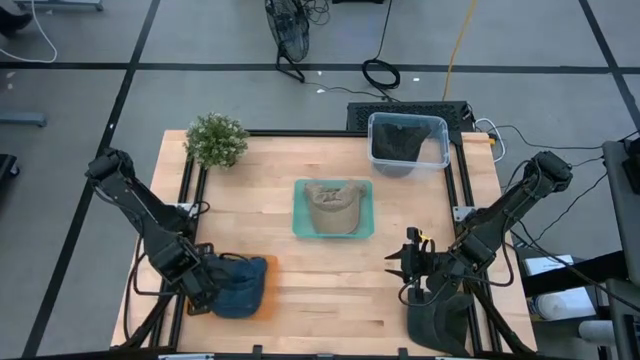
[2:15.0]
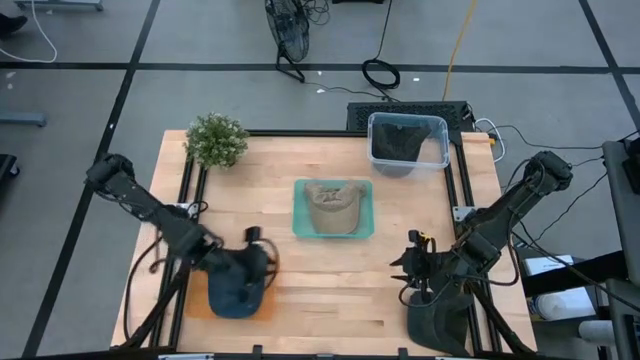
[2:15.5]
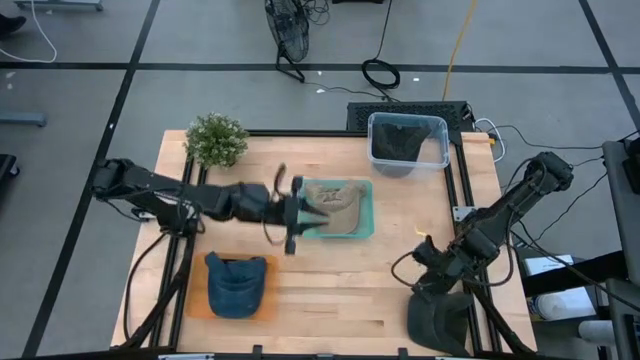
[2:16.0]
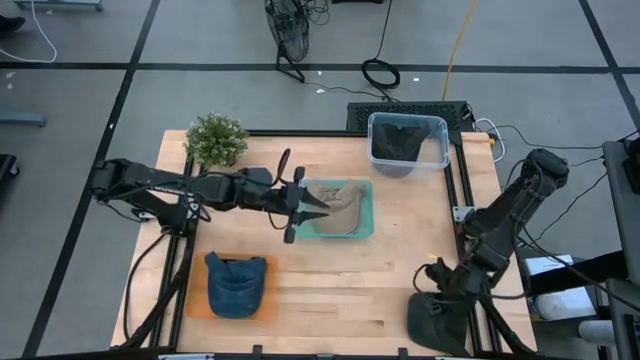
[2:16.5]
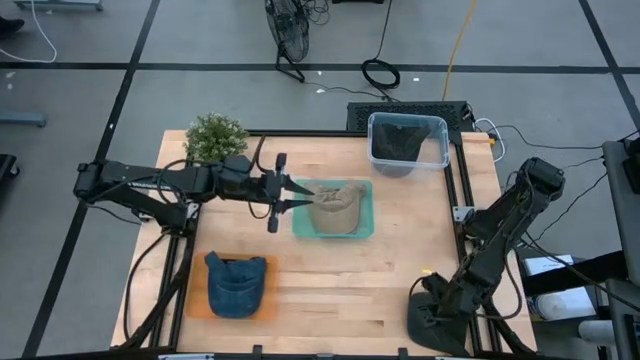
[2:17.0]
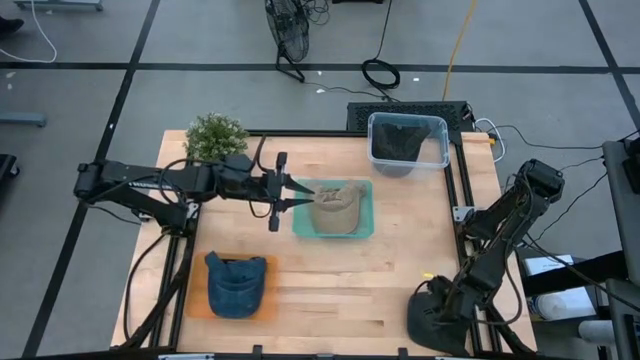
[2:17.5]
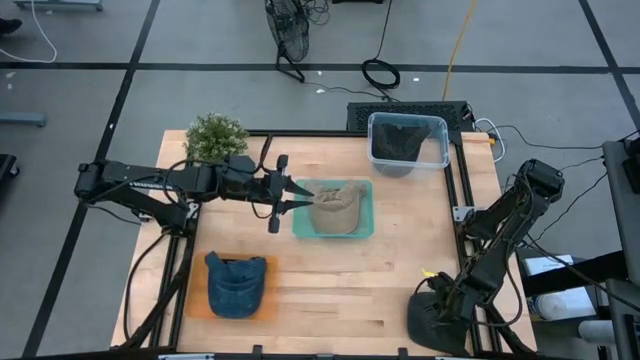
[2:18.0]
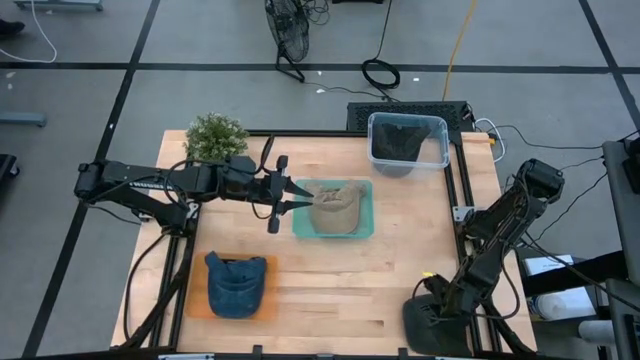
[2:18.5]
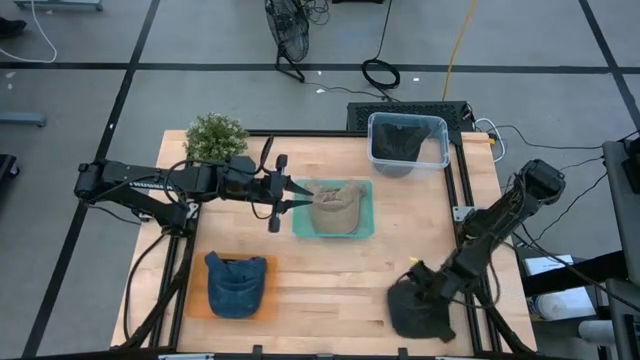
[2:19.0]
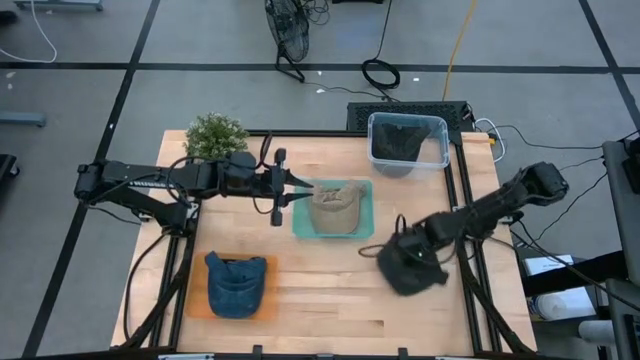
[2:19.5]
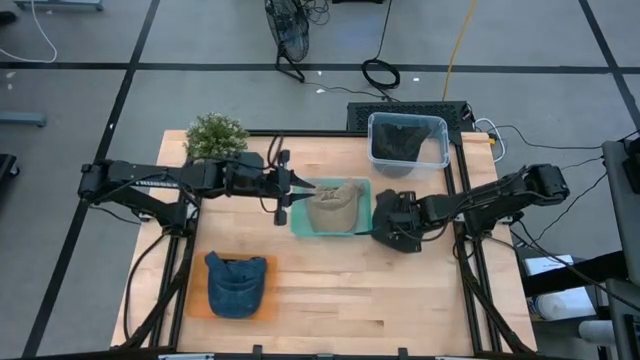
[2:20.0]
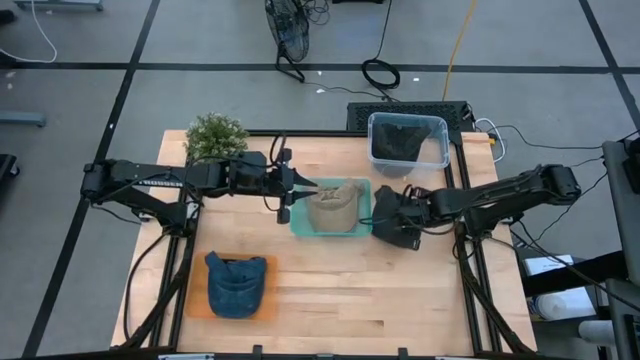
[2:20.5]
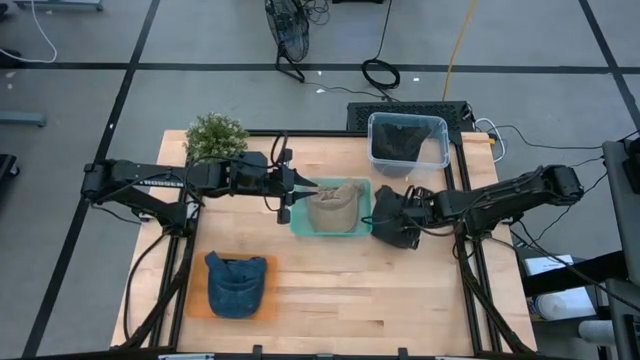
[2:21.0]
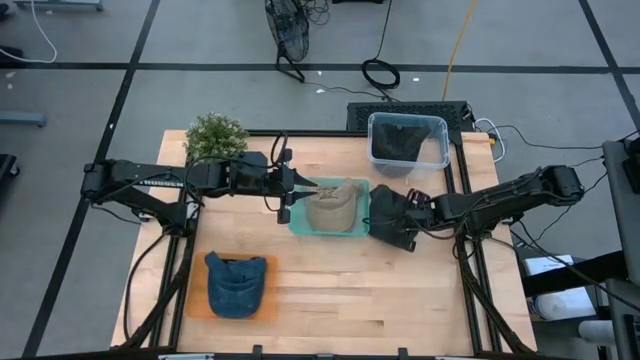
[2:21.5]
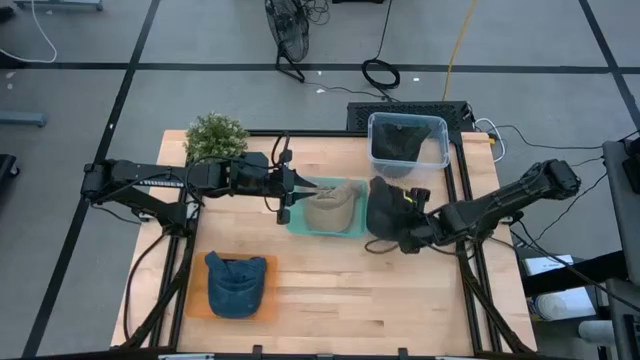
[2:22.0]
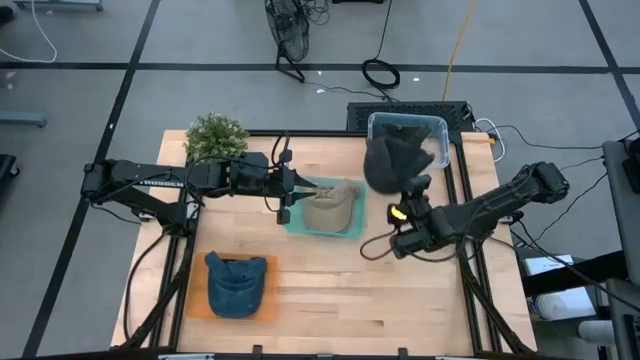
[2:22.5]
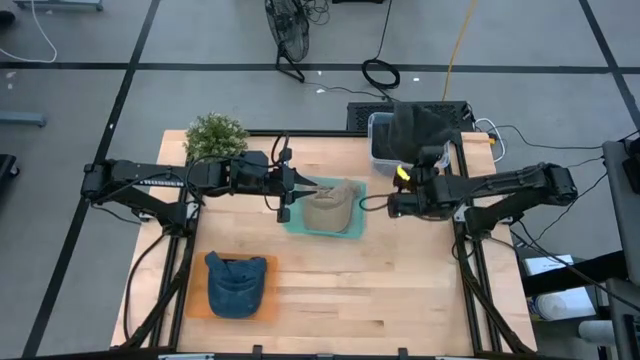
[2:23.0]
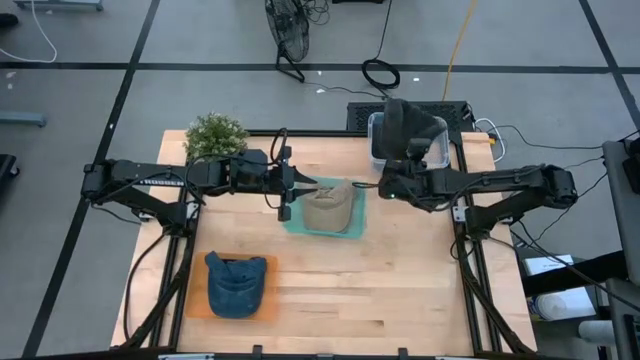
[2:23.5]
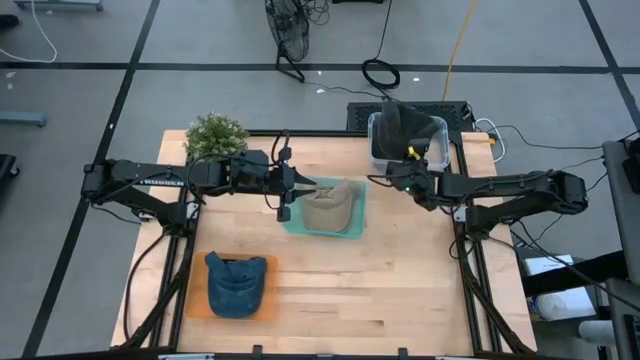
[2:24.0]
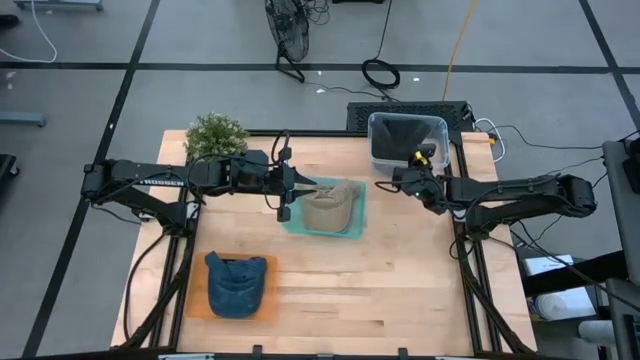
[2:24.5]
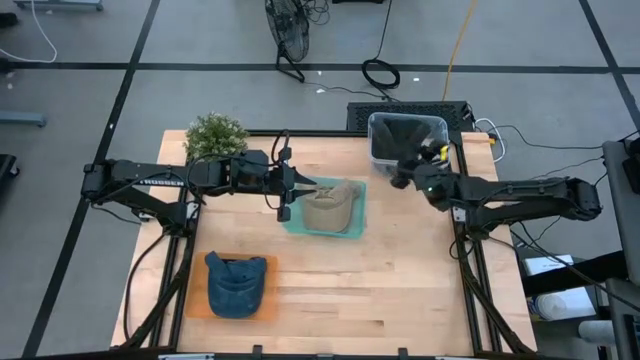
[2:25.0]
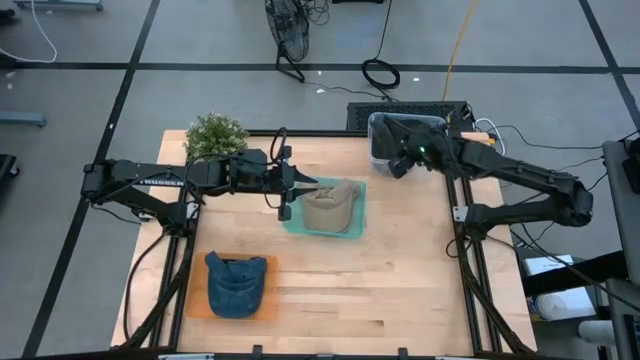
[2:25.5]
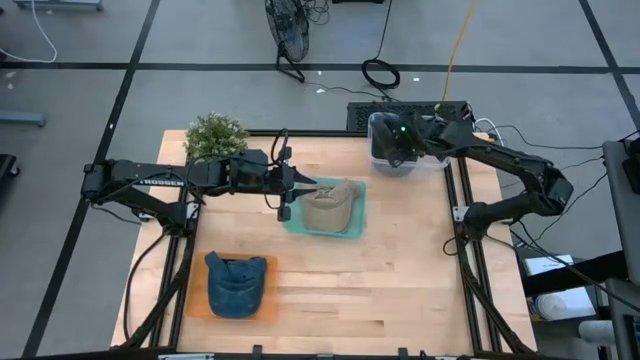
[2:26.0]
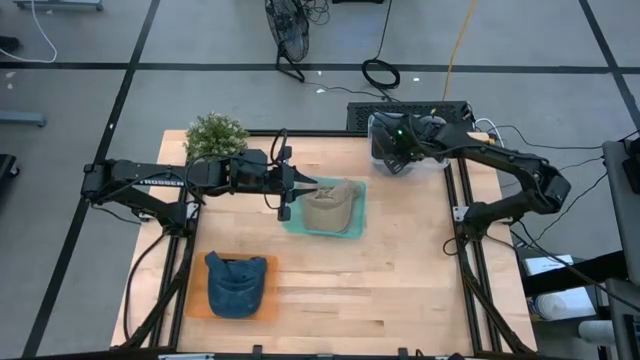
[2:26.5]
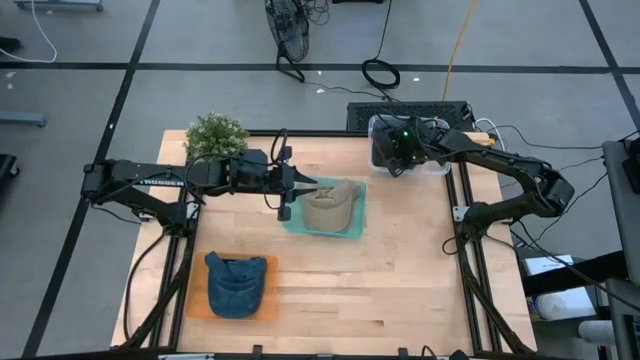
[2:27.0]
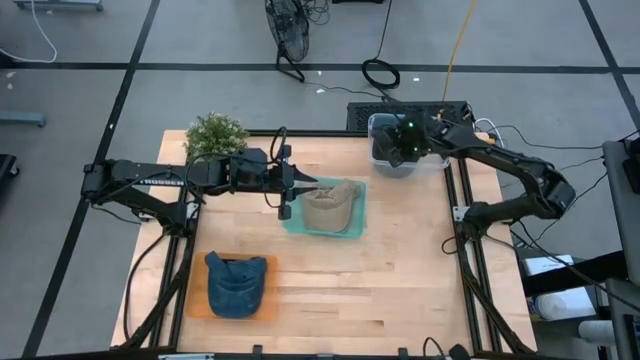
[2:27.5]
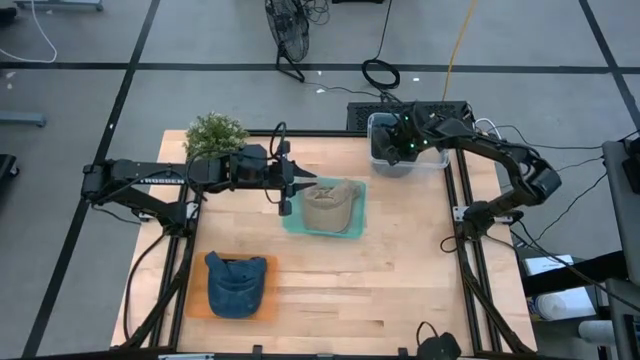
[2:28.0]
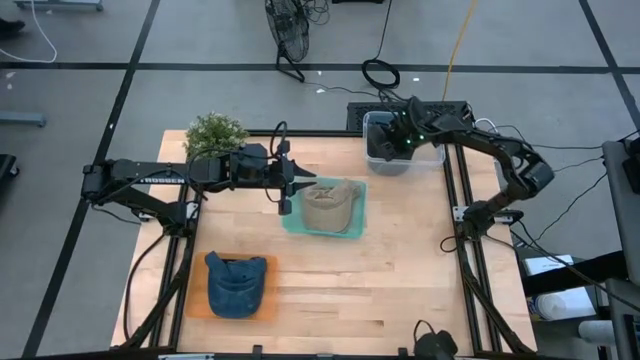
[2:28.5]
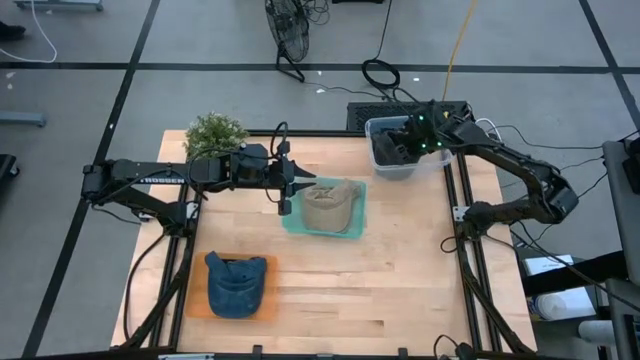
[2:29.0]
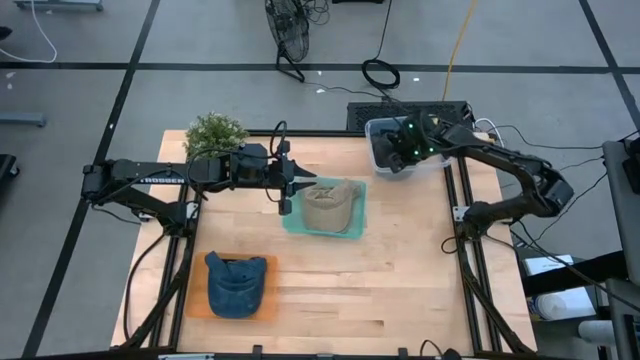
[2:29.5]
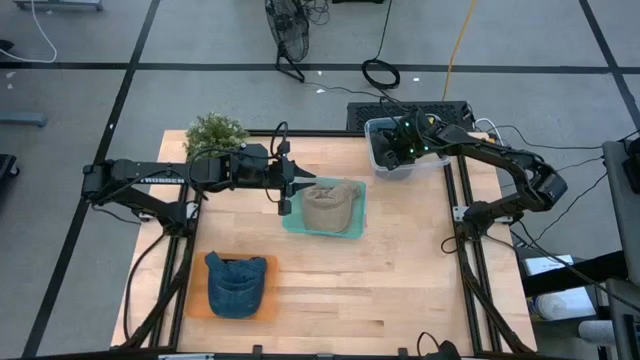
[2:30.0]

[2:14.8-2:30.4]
Task: Pick & Place hat
Put the black cap into the transparent bin

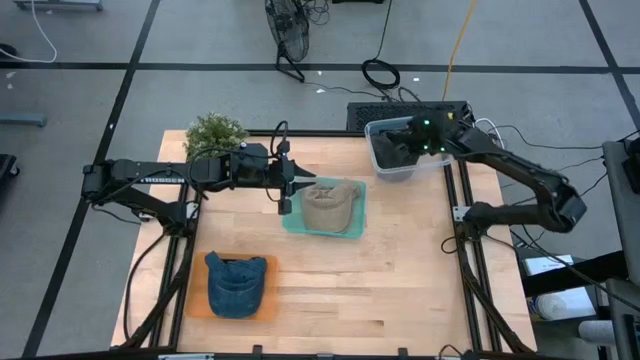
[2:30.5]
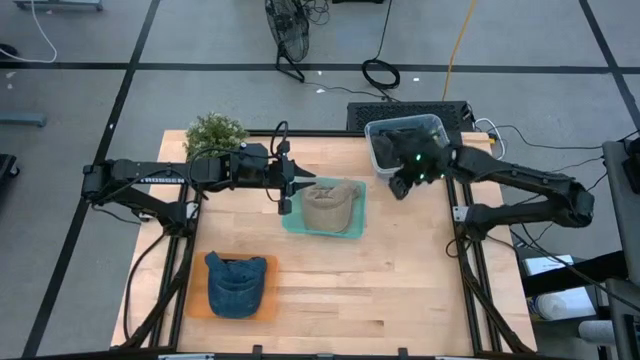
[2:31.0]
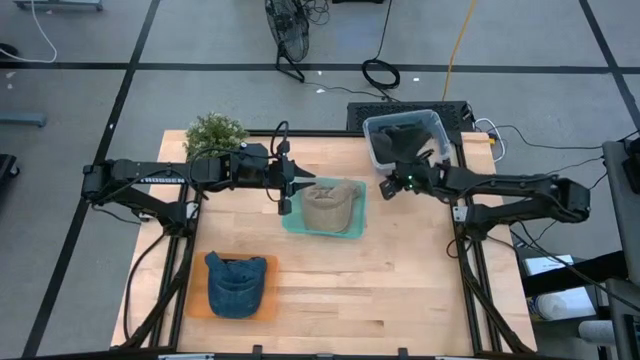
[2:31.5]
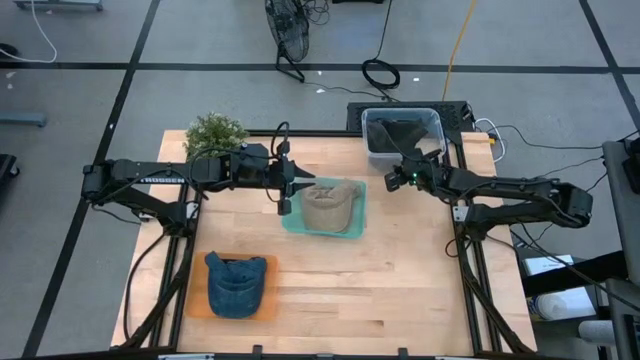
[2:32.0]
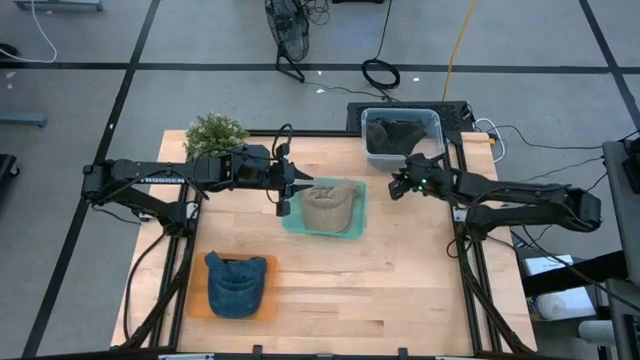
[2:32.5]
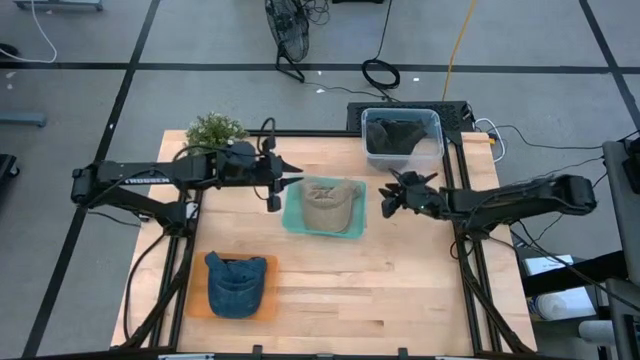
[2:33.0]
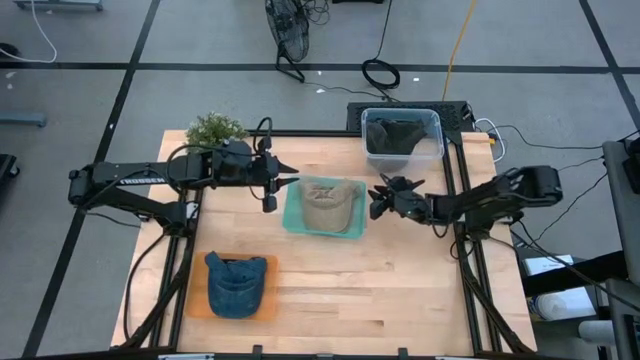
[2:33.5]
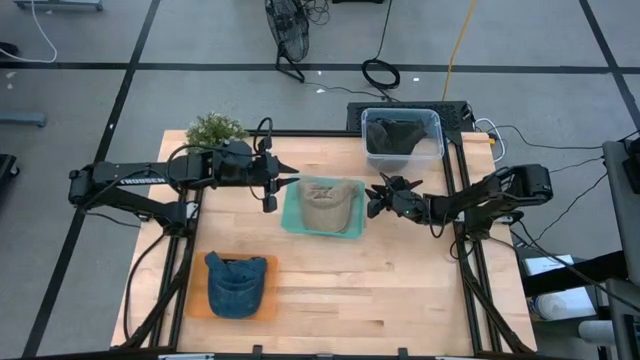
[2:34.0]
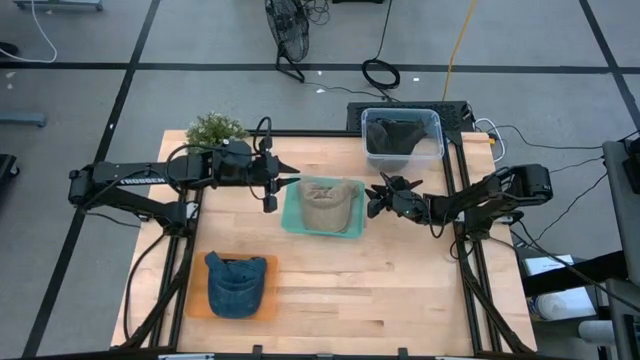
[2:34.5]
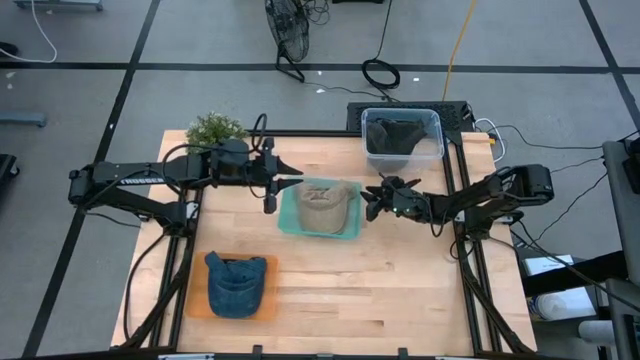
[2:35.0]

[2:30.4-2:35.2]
Adjust the bins on the table

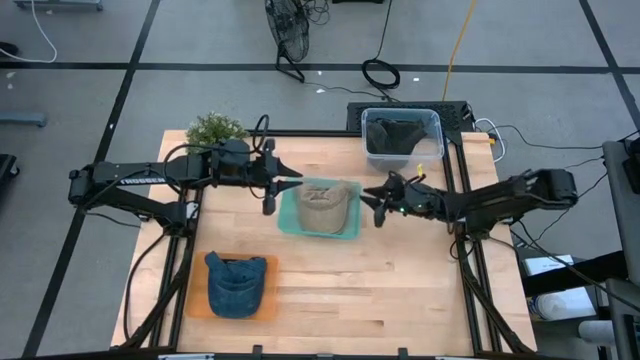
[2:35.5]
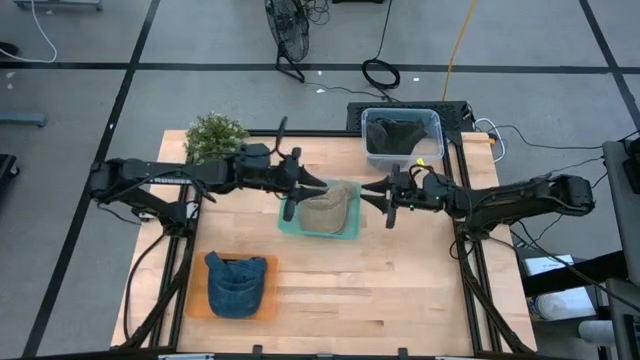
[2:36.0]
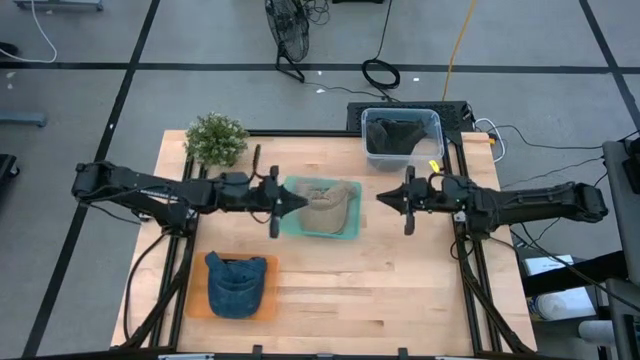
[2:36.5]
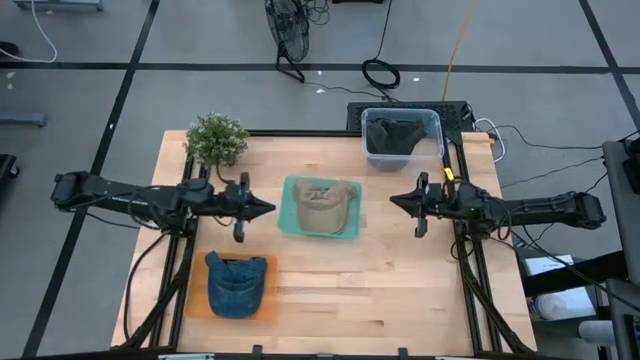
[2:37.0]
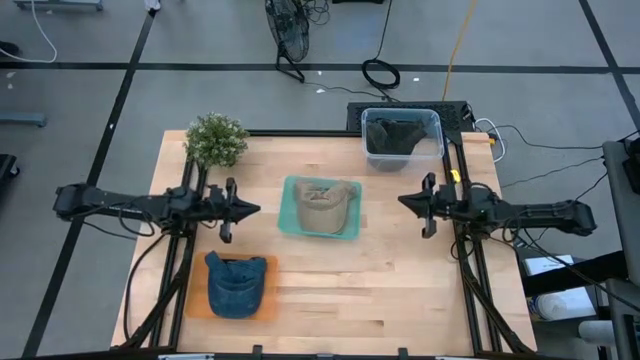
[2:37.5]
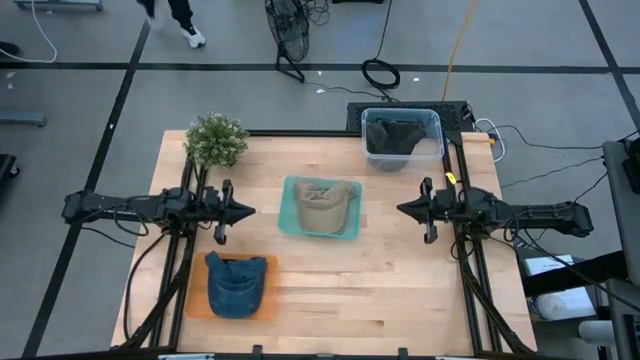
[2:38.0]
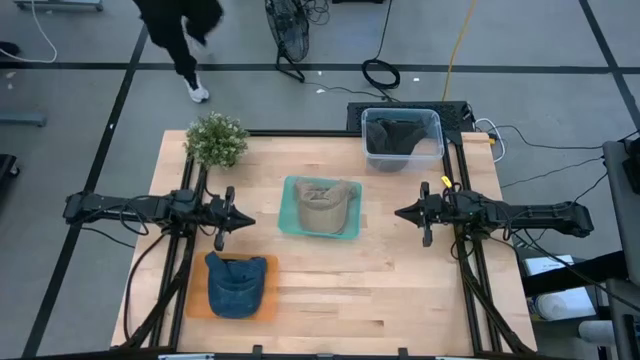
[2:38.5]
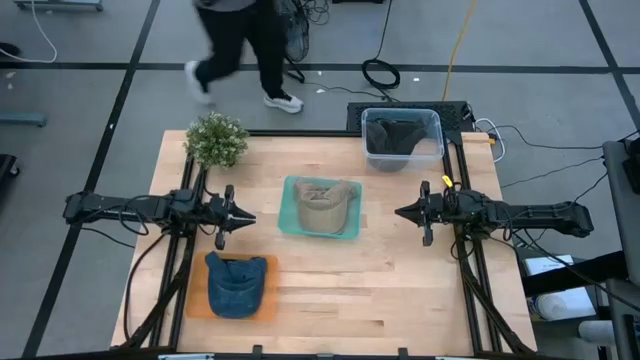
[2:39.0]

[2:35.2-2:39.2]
Return to Home Position
